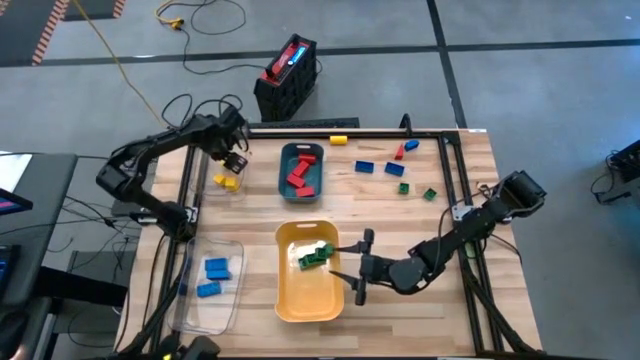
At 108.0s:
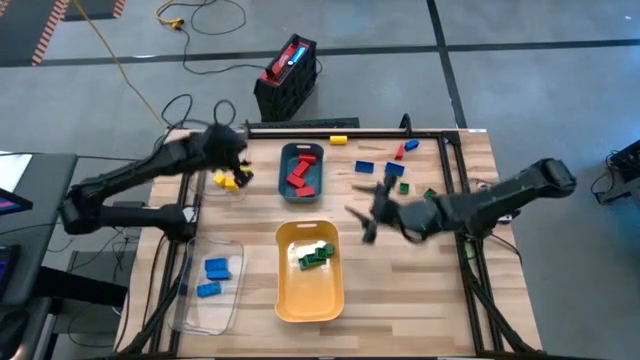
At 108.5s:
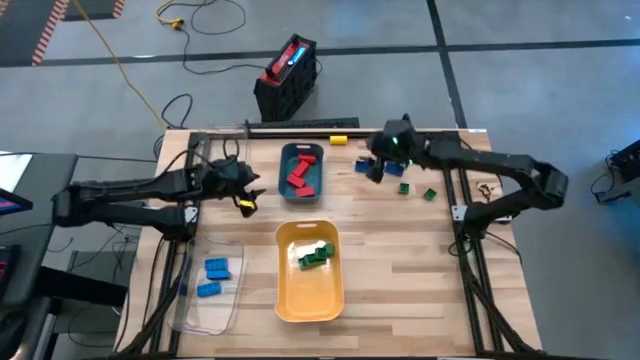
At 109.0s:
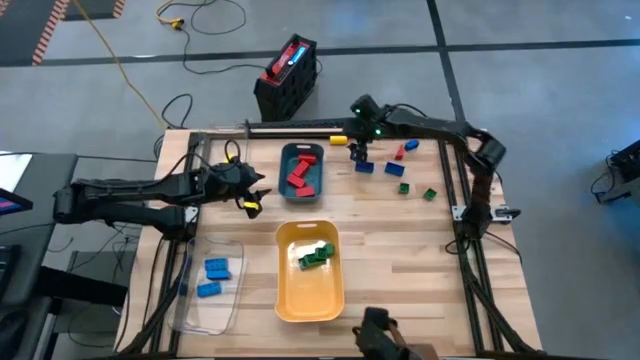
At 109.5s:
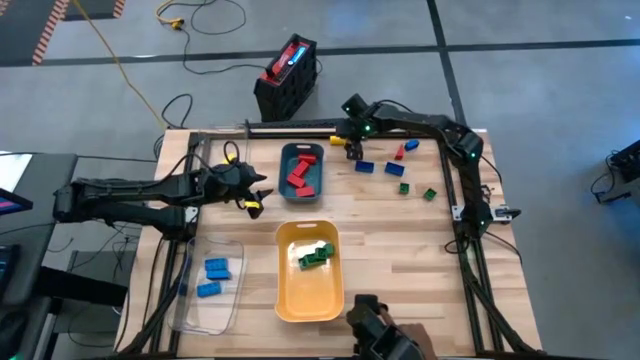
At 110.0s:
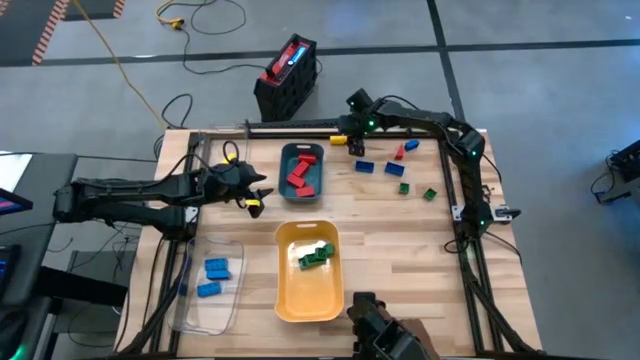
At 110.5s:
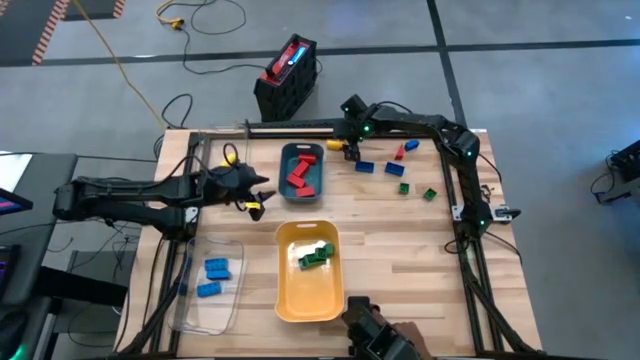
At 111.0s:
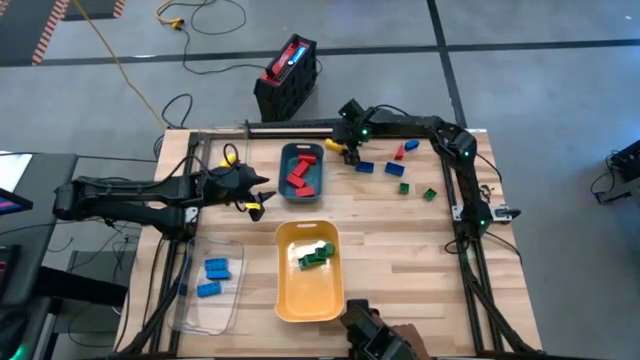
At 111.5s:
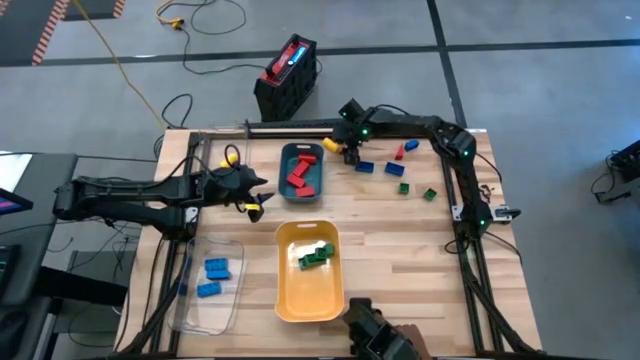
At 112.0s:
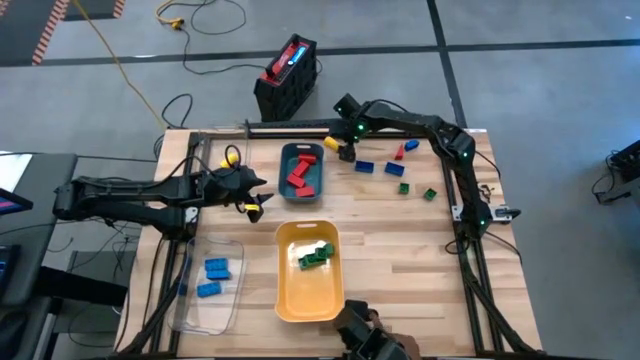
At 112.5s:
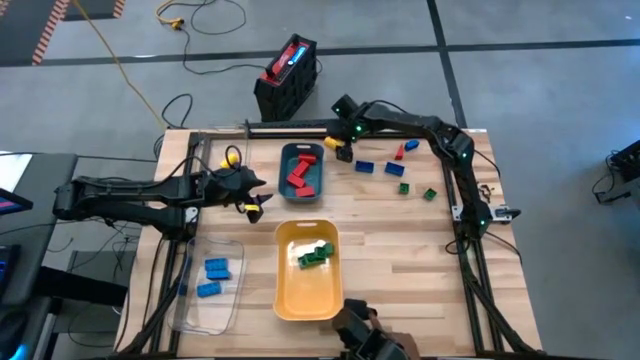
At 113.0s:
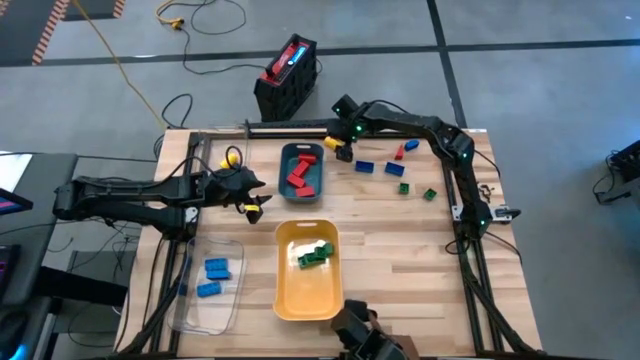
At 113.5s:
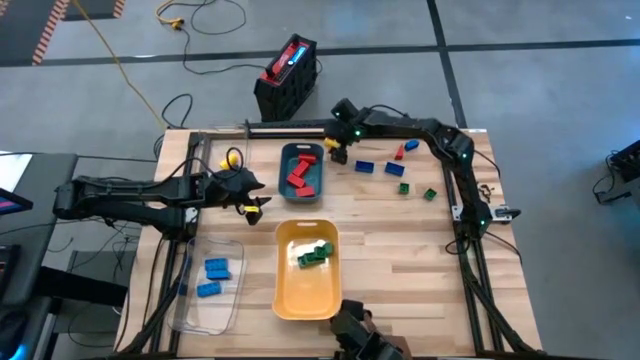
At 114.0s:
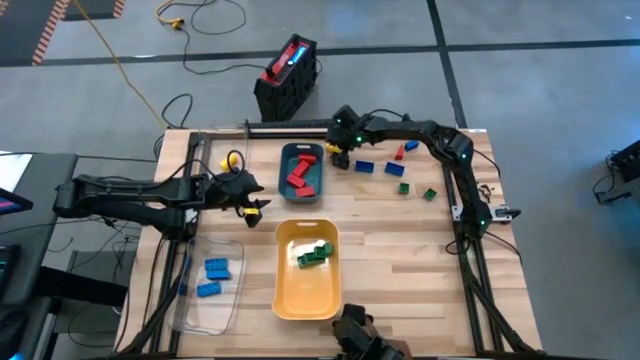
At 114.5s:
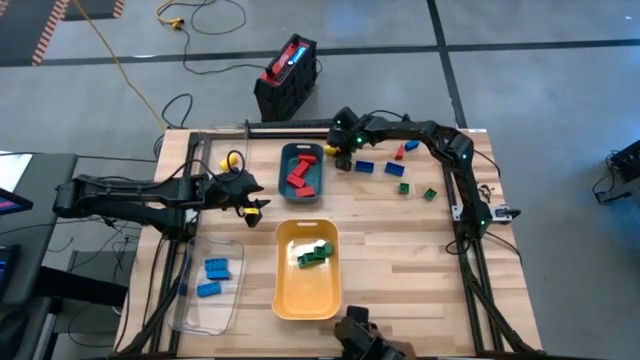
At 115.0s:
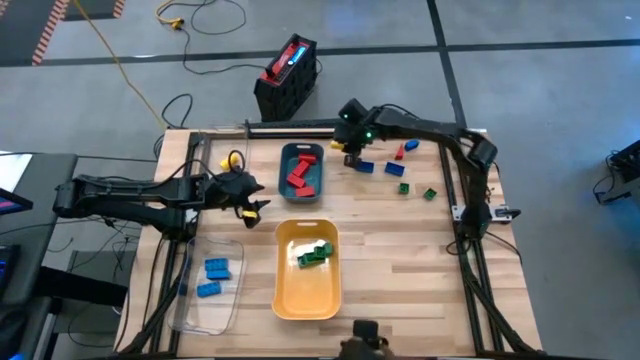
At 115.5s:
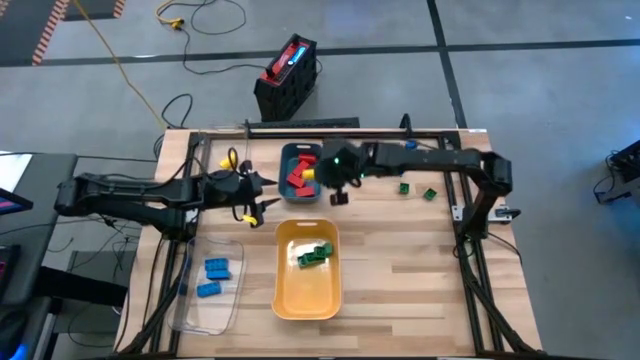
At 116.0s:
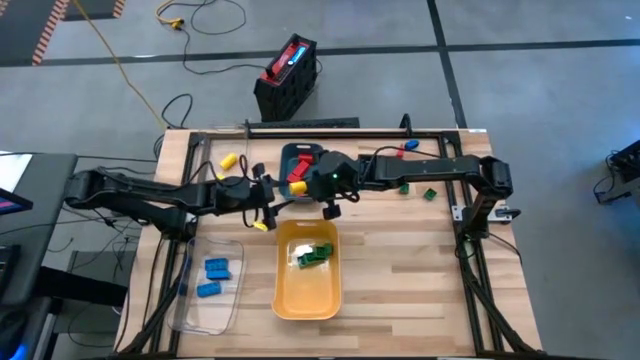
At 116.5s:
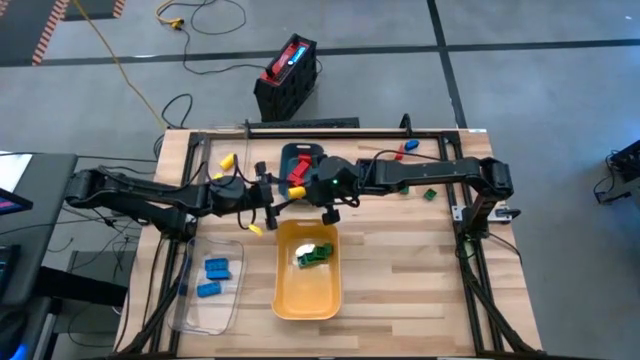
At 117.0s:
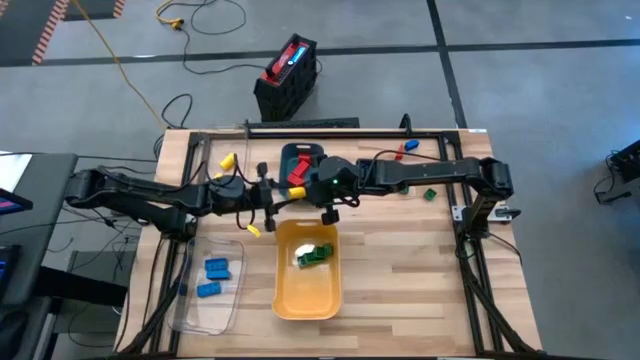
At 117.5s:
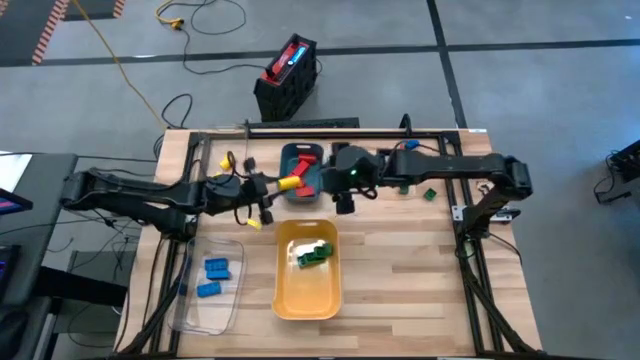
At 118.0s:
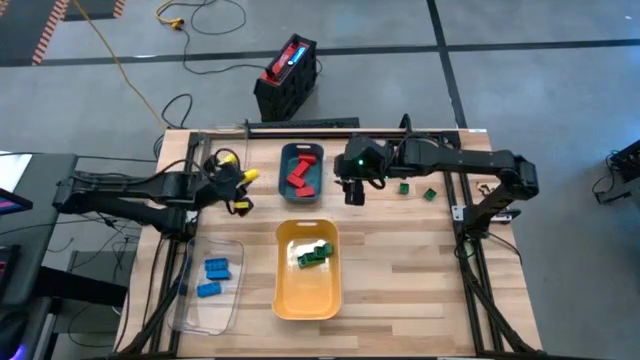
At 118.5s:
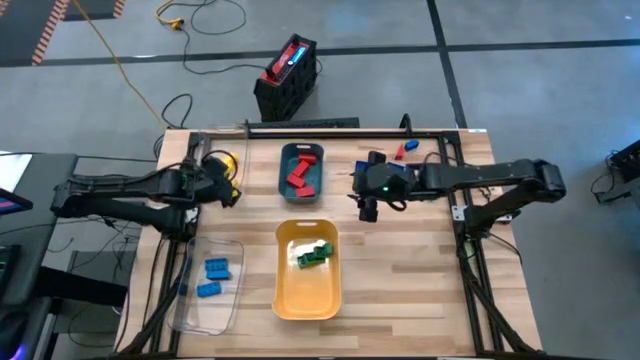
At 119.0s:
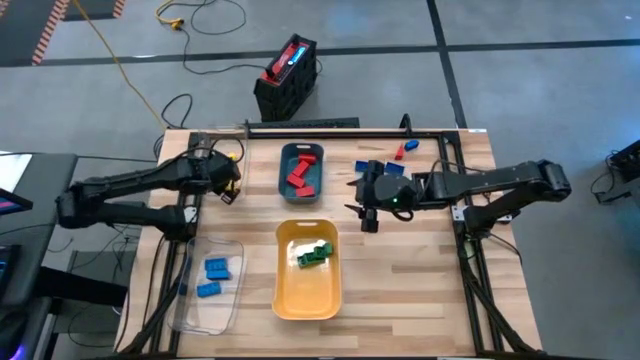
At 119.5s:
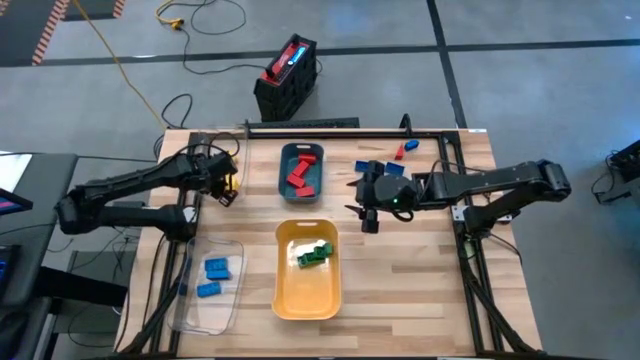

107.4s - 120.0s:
Task: Sort blocks
Put the circular yellow game piece into the top left transparent bin

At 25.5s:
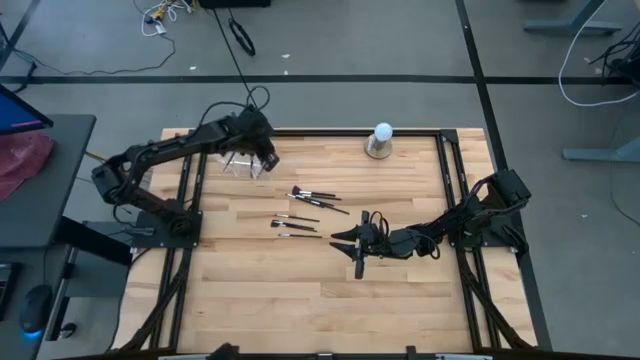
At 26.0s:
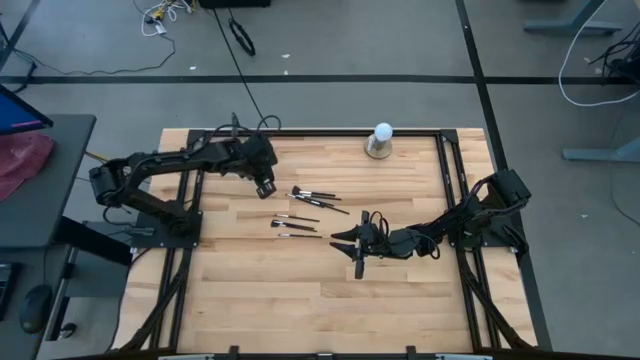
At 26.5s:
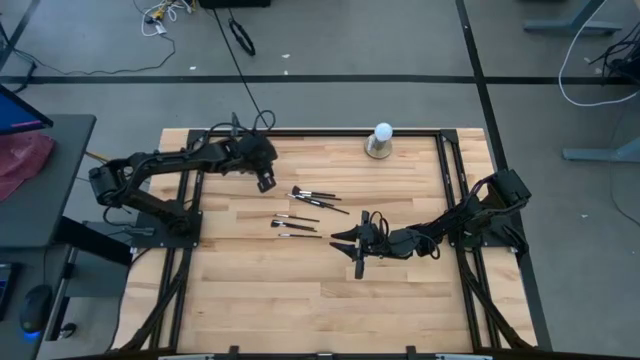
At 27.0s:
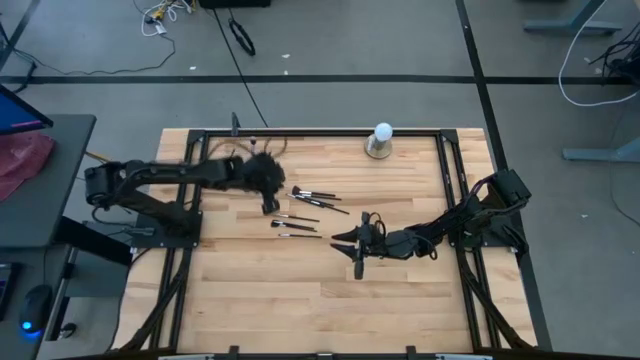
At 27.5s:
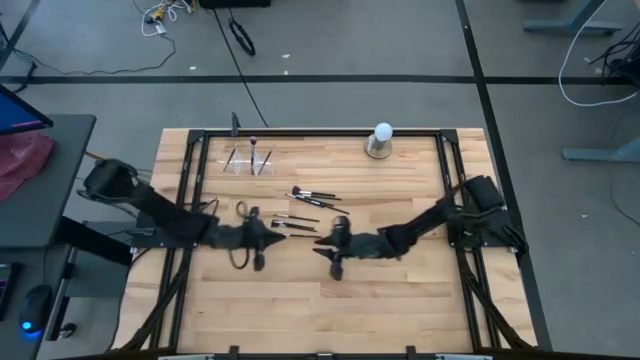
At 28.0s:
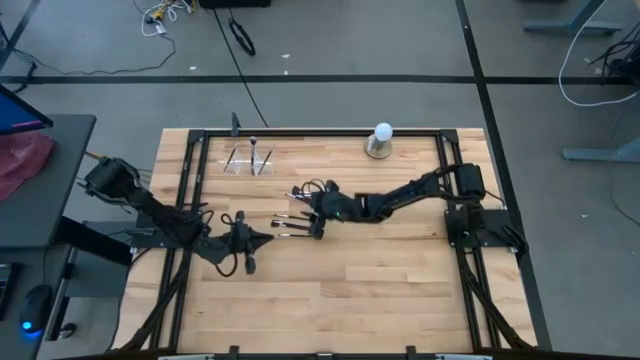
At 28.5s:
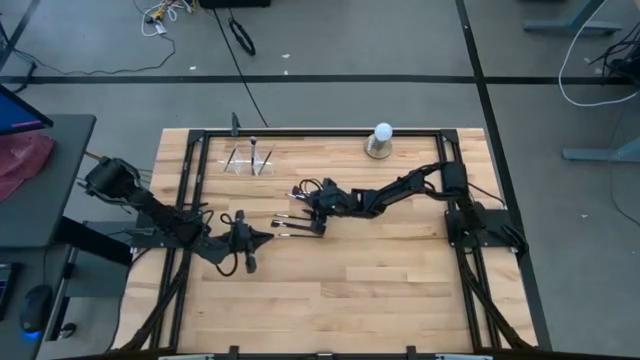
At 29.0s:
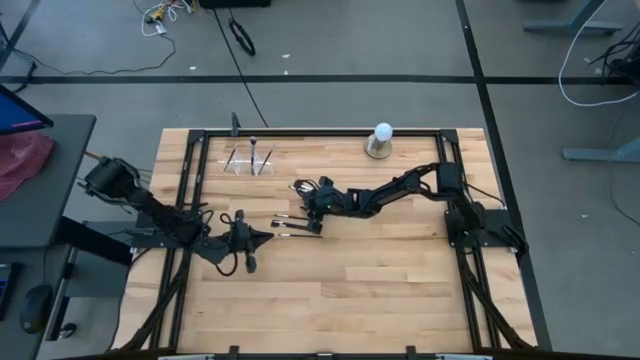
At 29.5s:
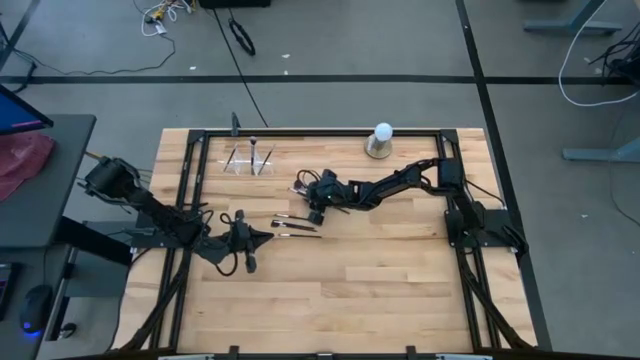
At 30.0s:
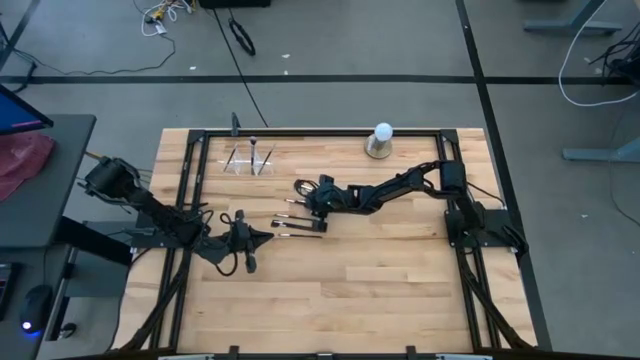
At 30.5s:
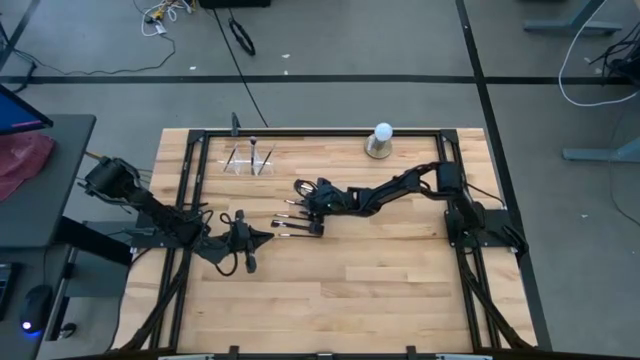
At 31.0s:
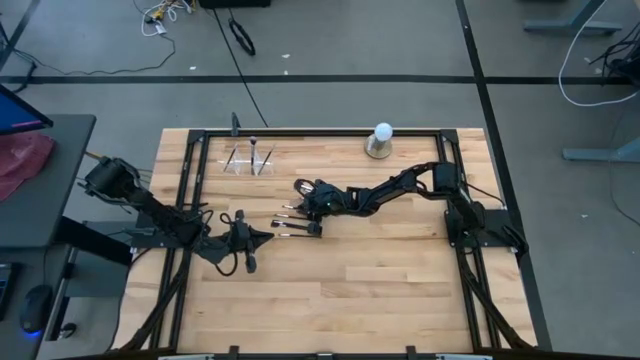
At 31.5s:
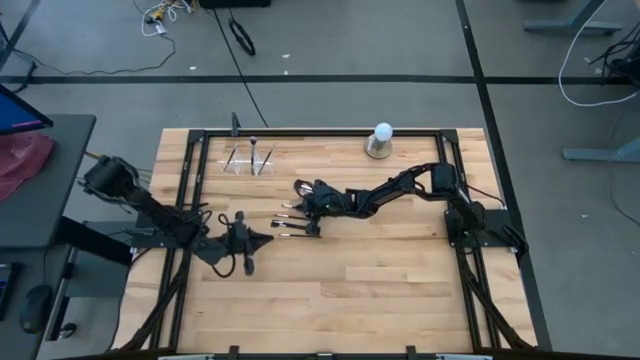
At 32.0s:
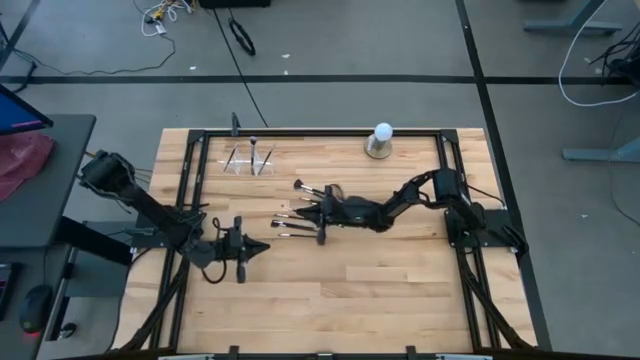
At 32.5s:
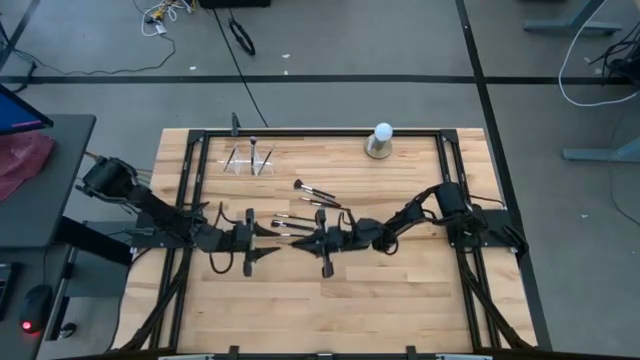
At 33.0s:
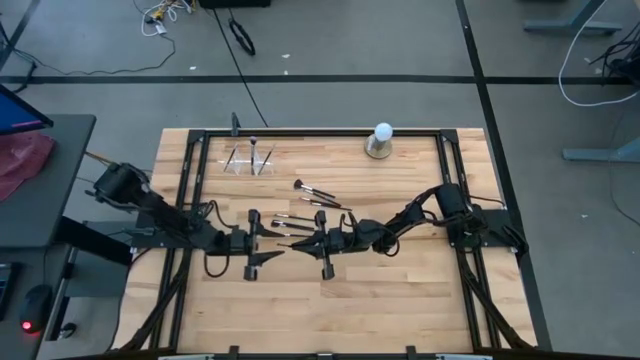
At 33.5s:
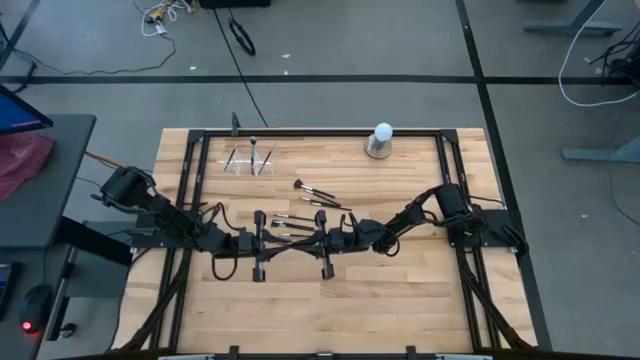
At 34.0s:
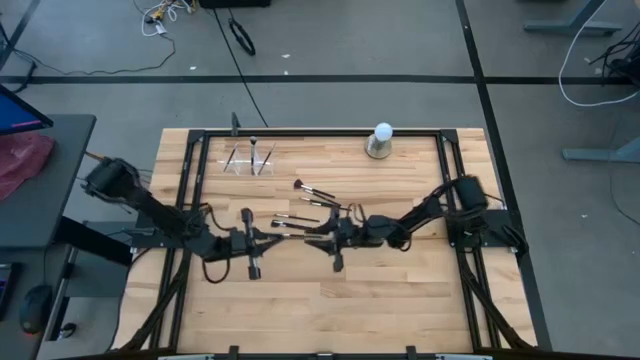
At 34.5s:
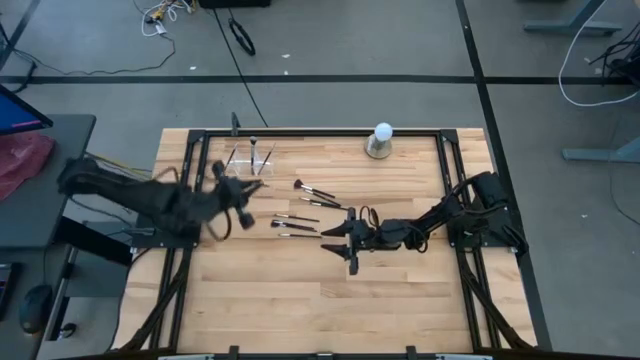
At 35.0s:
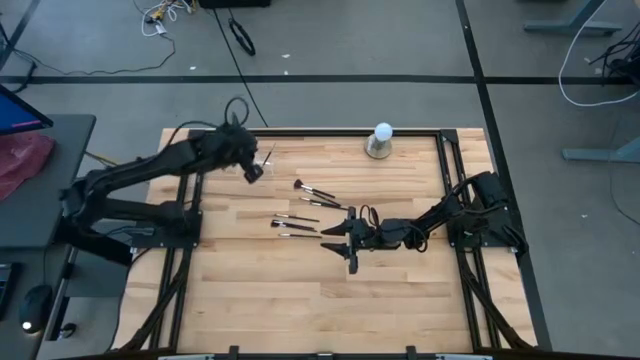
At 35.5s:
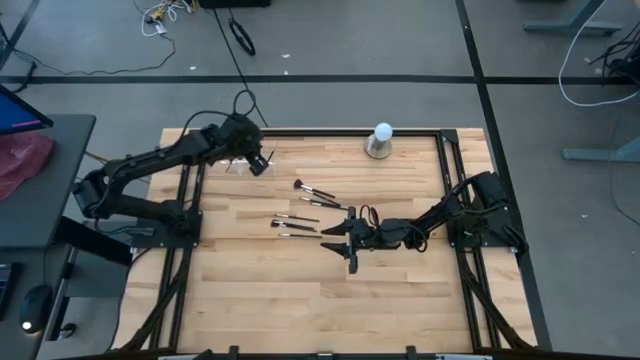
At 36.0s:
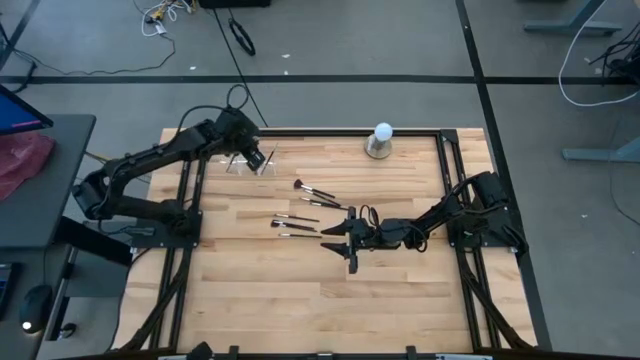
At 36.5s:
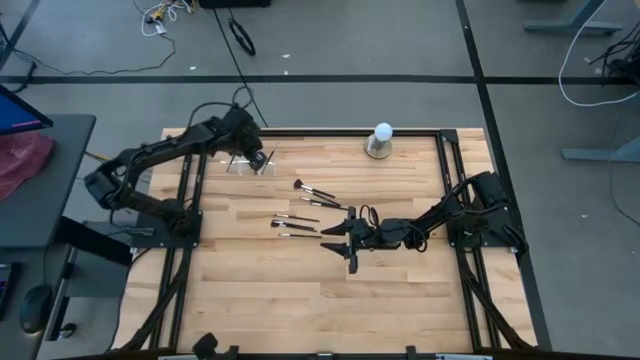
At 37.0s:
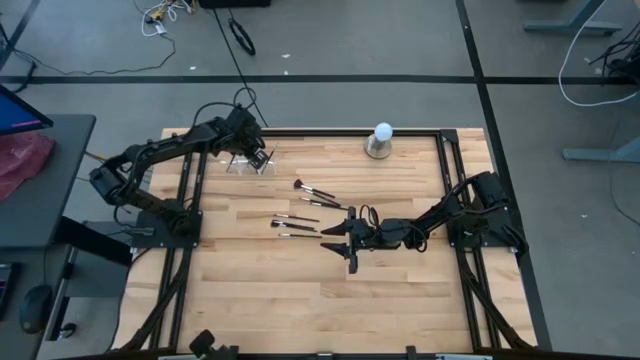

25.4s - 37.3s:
Task: Put items in baskets/containers
Put the eyeshadow brush into the transparent organizer
